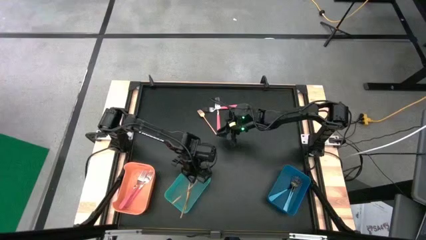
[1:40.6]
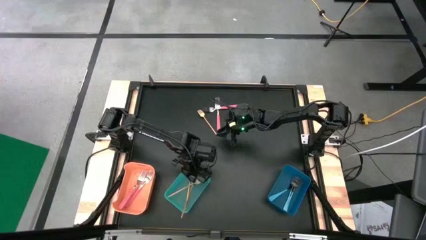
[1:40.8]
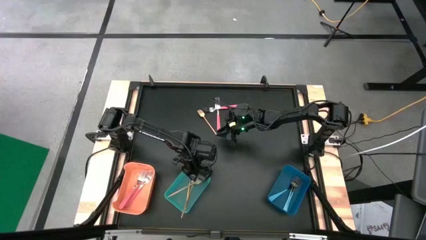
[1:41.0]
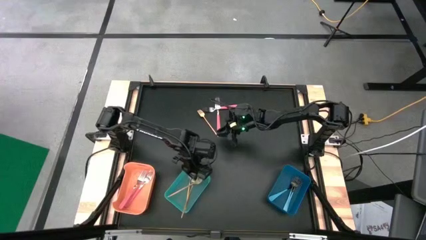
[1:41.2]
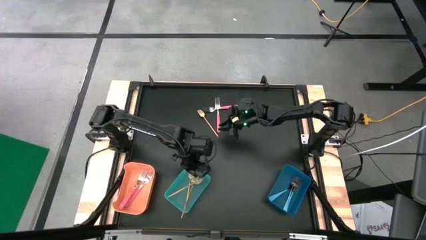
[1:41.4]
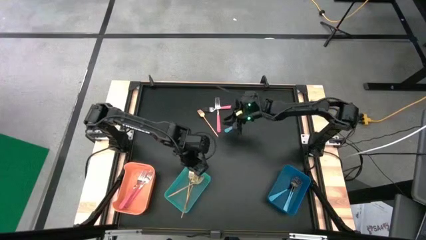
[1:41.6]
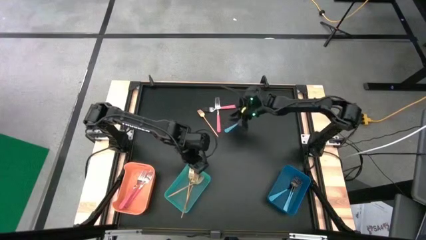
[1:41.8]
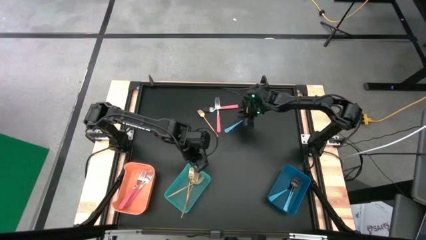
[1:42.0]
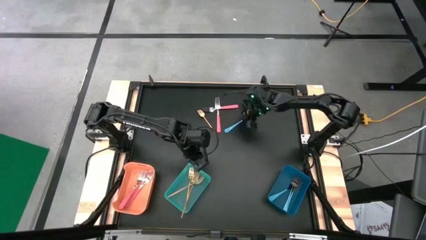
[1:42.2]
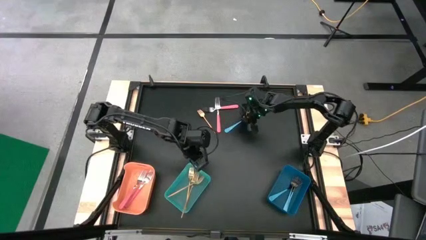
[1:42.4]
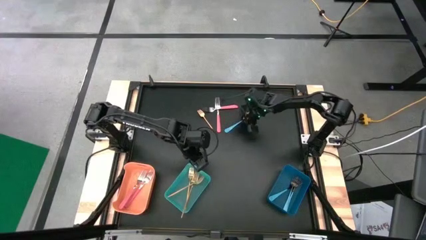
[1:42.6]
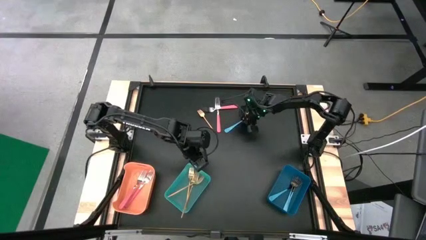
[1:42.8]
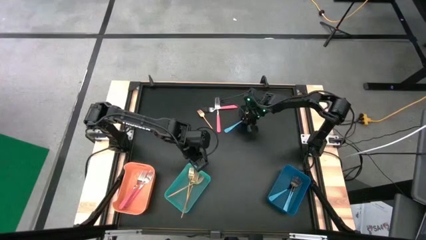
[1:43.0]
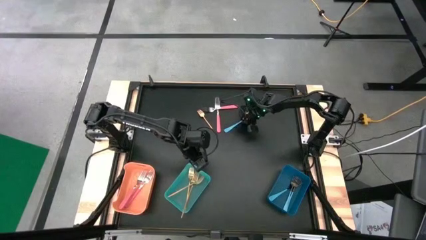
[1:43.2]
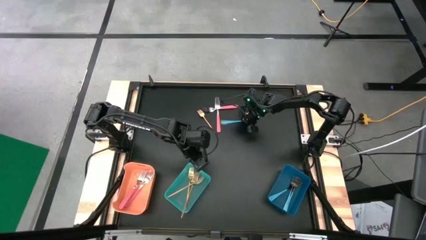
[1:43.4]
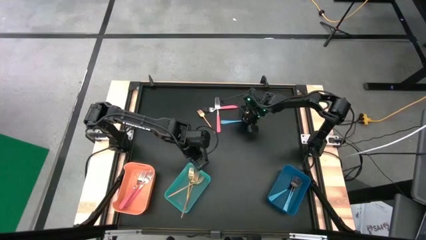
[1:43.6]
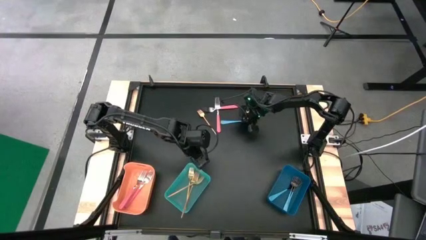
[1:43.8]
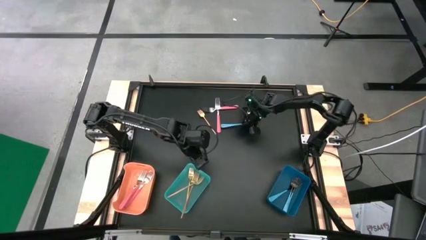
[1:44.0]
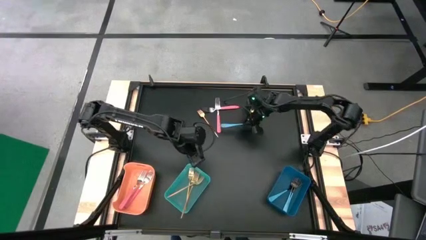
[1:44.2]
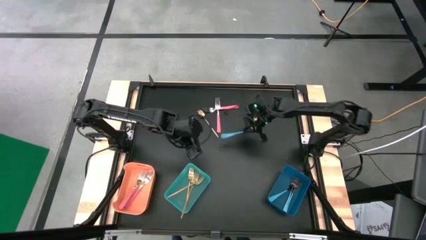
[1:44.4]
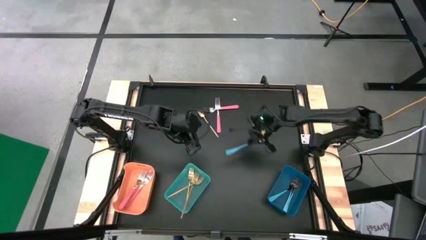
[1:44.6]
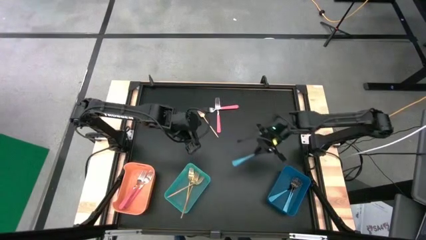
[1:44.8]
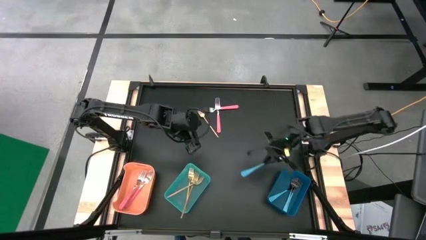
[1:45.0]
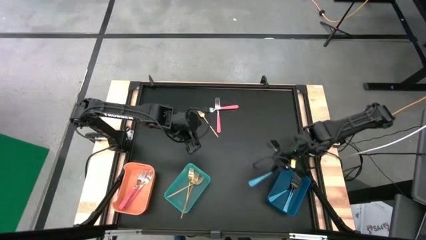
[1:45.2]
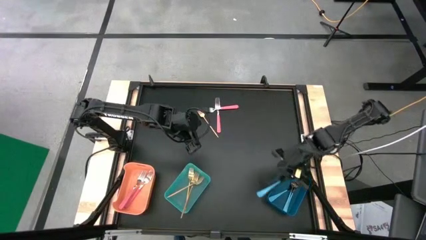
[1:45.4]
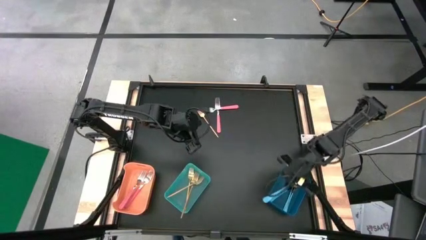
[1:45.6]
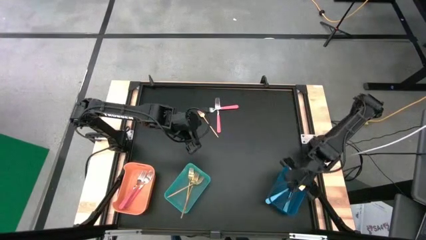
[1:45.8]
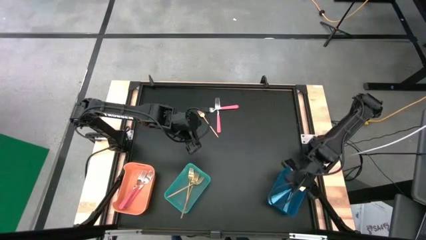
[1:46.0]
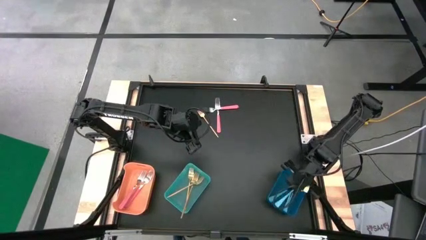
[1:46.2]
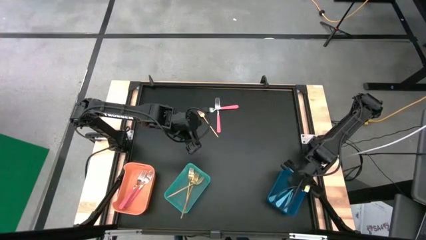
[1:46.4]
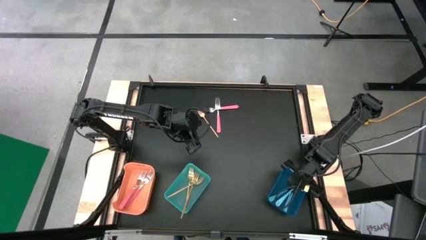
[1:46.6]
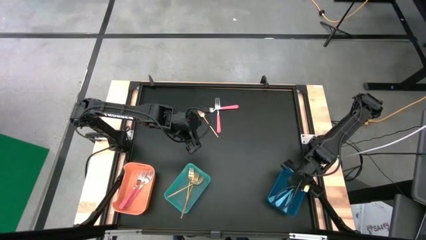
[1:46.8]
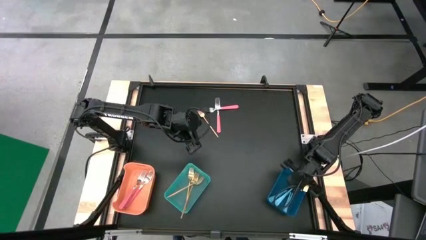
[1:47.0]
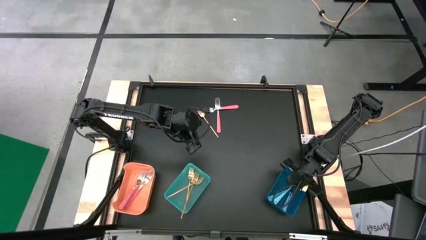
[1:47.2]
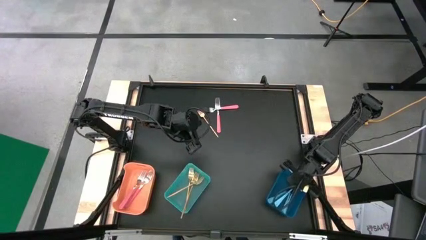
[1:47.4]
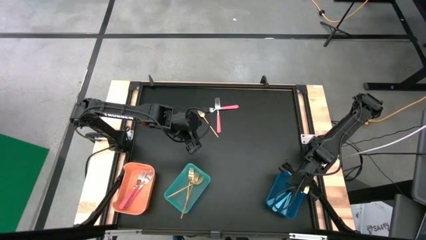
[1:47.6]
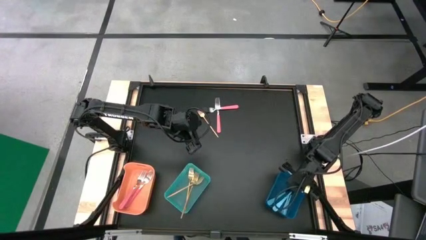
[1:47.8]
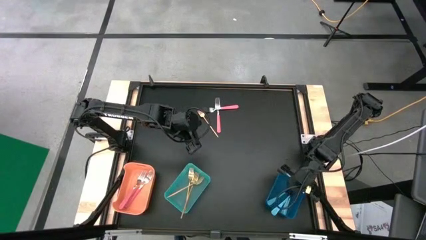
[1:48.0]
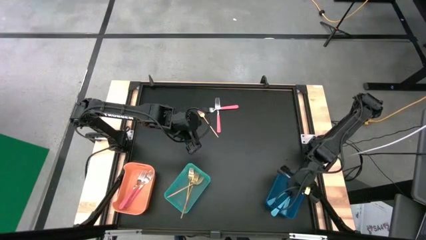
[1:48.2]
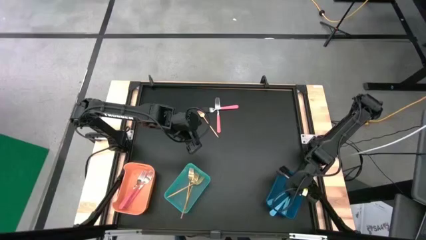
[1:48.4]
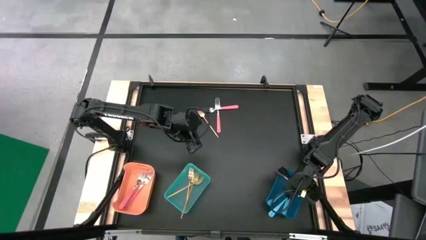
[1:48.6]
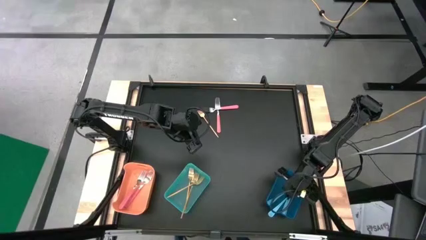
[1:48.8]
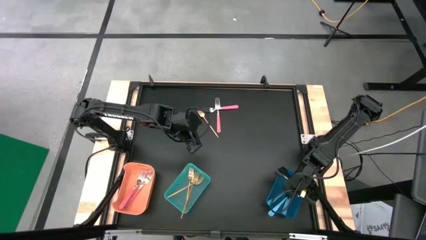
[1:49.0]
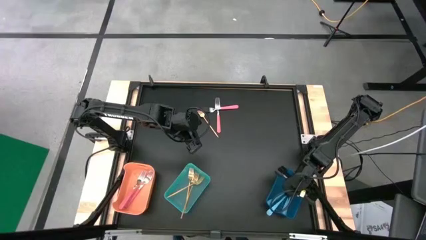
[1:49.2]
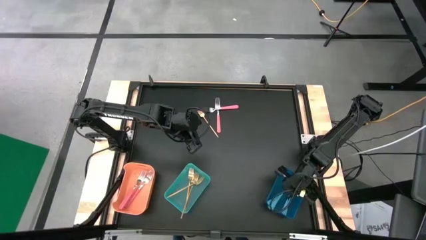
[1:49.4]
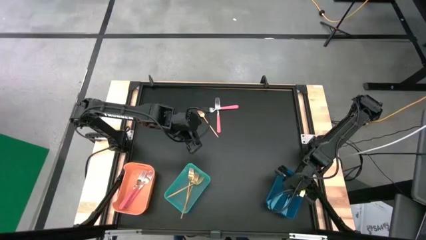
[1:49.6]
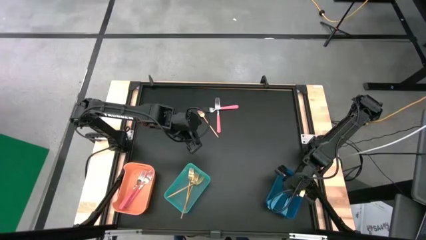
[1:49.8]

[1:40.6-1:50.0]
Task: Sort silverware by color (type)
Put the blue fork into the blue bin

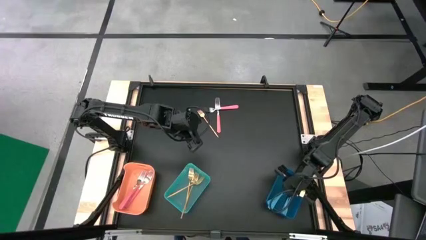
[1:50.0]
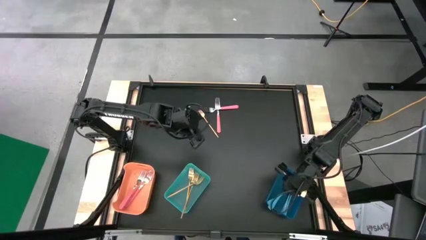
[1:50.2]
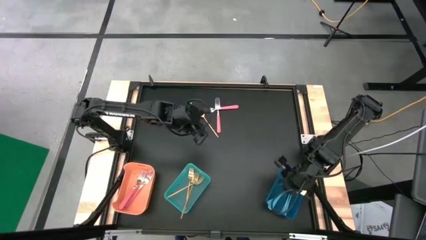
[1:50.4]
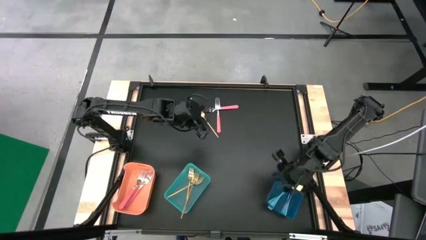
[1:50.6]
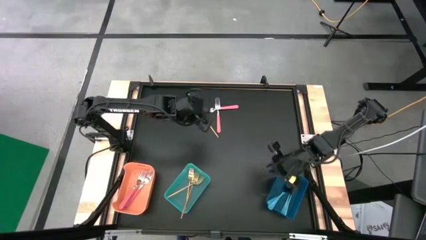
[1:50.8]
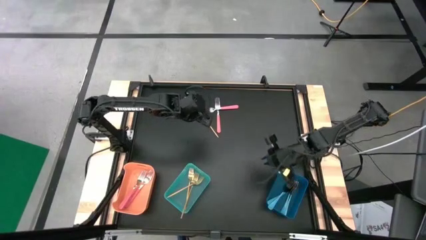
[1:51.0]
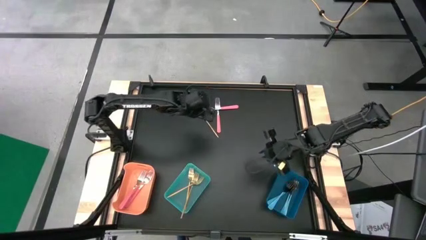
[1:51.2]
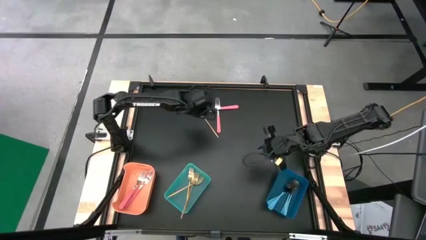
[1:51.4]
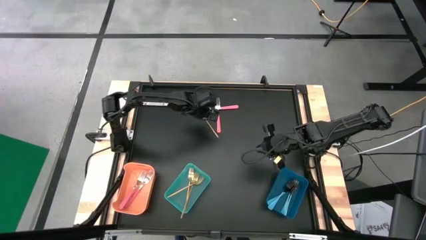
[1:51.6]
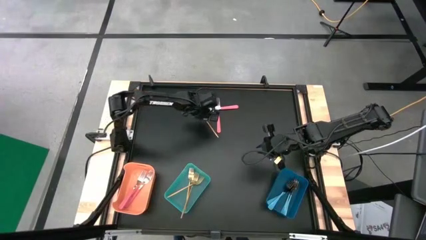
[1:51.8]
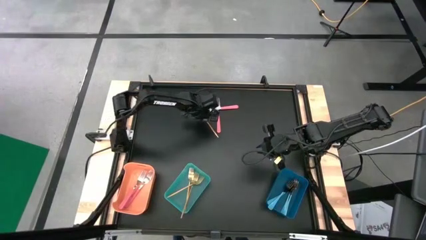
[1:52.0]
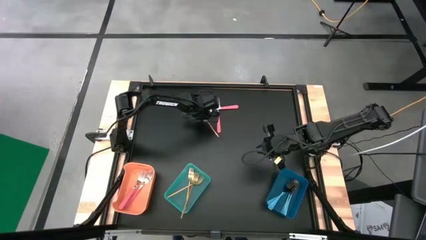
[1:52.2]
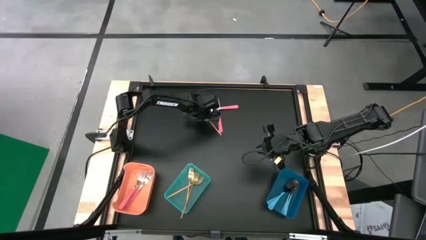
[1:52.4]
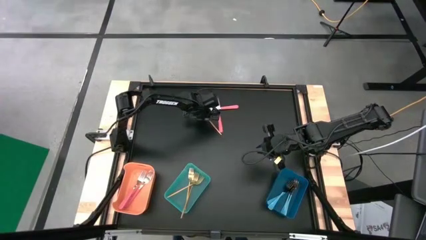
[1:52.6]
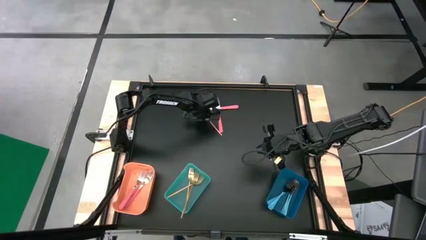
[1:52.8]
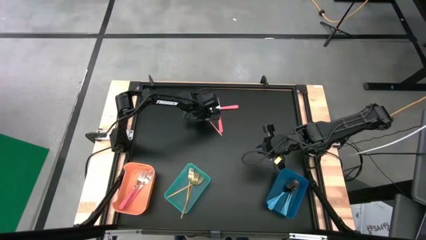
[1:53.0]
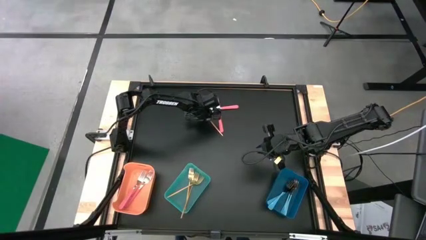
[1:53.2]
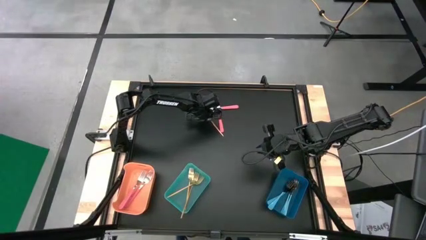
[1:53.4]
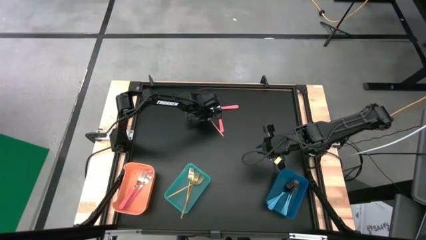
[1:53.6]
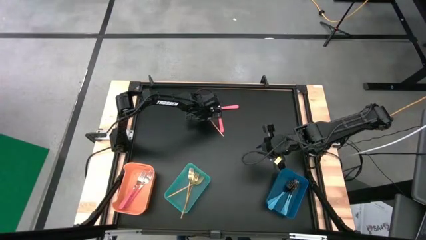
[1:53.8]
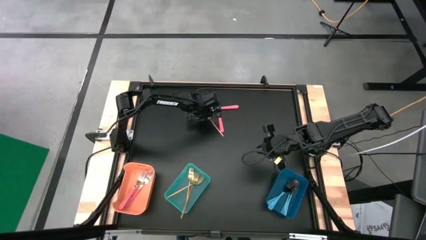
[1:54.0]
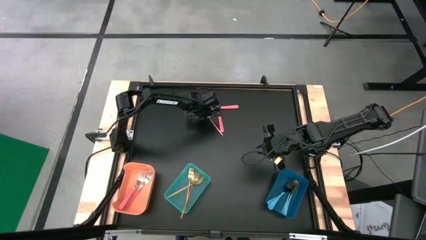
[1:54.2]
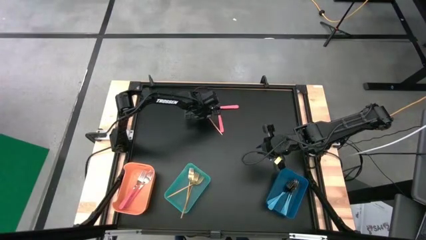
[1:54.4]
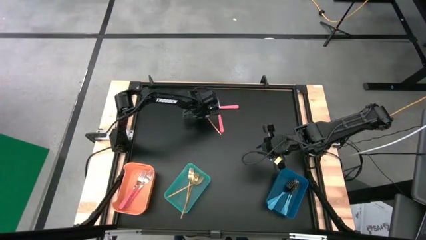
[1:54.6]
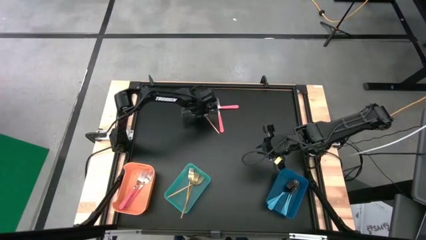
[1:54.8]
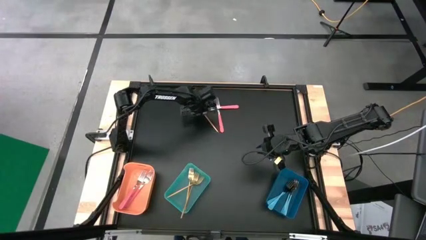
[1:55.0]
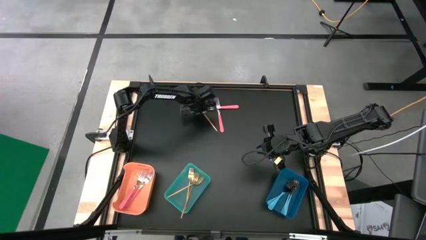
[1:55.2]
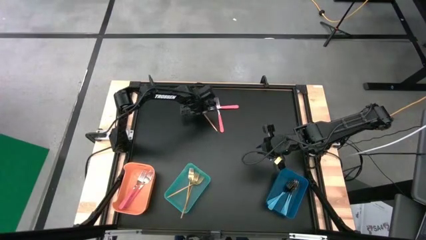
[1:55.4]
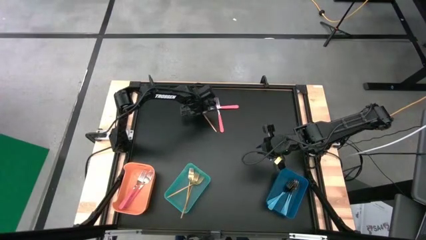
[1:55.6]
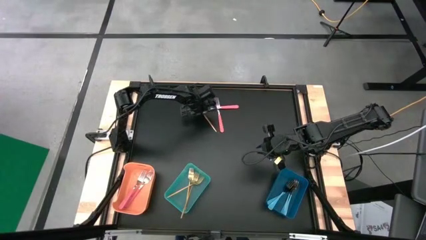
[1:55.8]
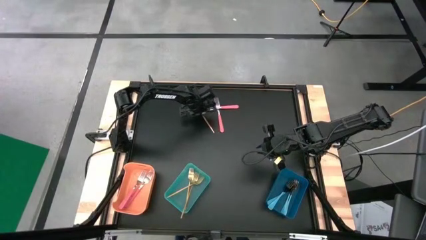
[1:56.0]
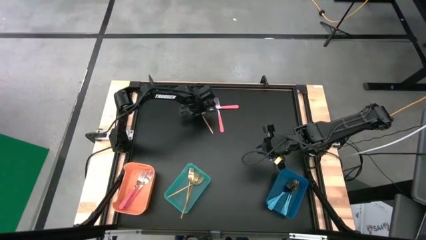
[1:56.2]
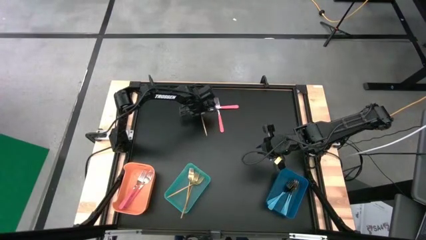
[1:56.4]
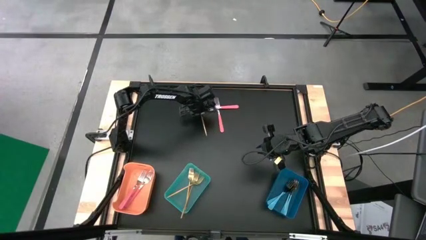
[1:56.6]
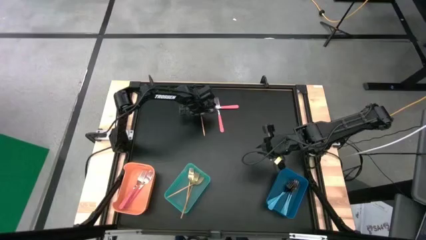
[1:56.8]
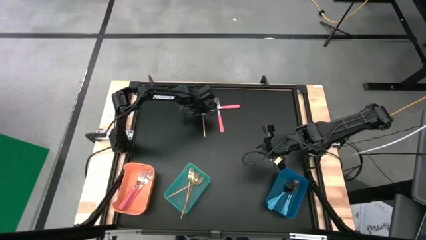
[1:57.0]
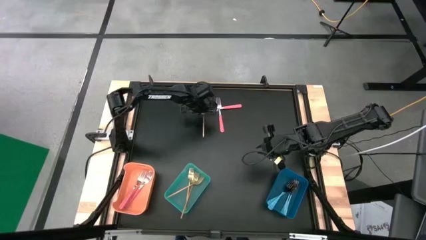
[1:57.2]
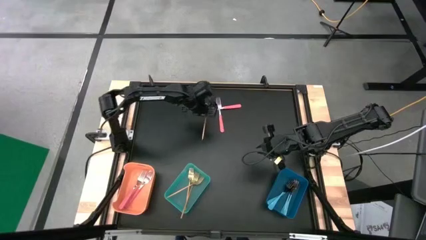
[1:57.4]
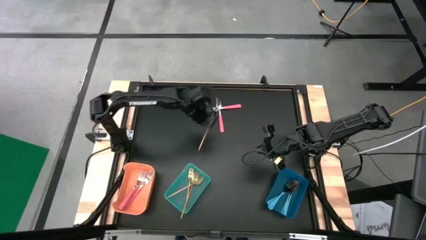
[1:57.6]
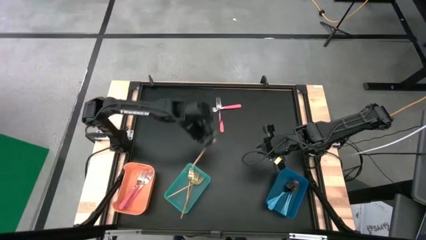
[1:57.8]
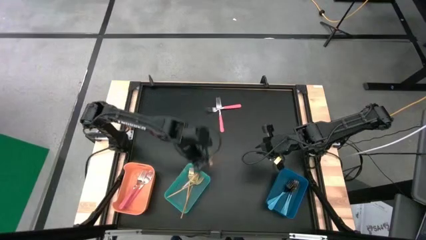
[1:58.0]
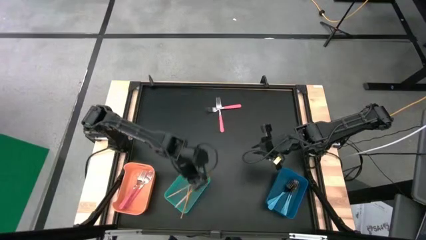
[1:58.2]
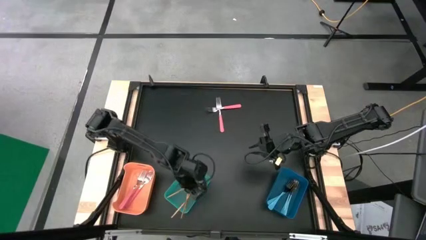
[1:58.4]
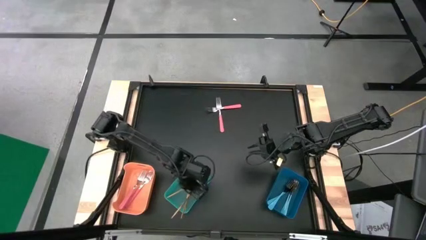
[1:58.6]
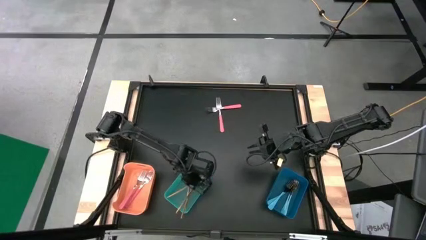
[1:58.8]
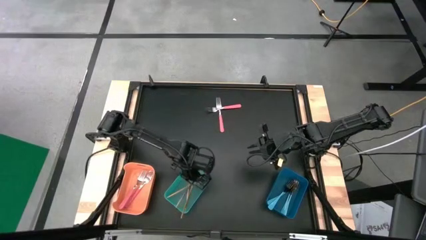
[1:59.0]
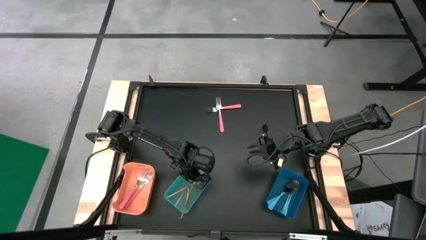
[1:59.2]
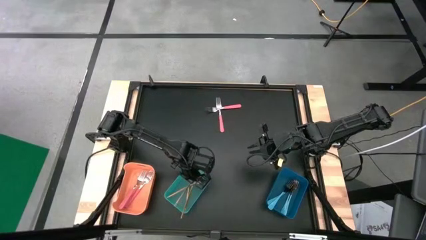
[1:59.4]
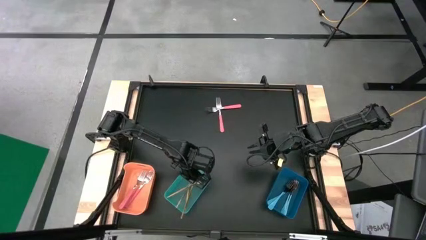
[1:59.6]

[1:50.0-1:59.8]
Put the gold fork into the green bin
